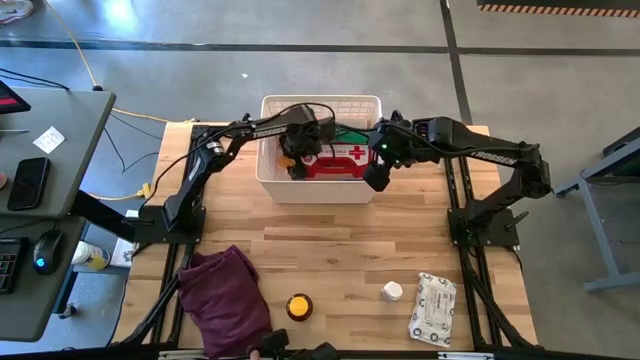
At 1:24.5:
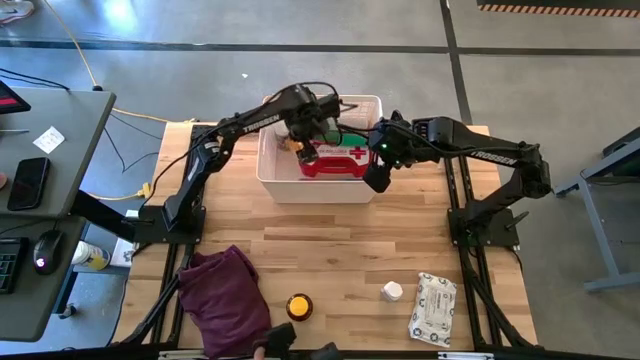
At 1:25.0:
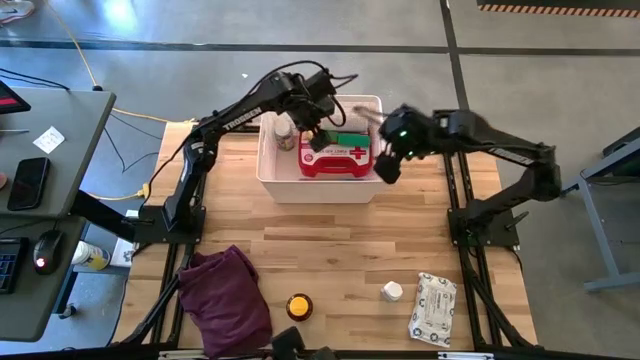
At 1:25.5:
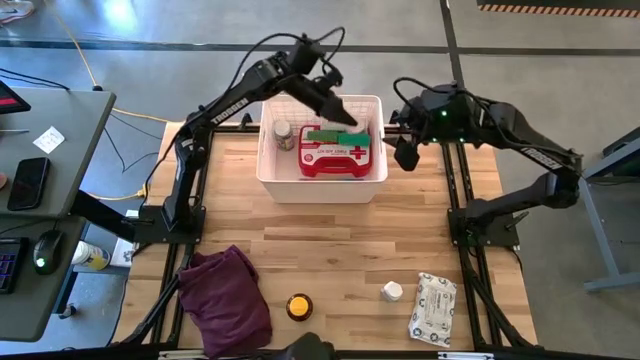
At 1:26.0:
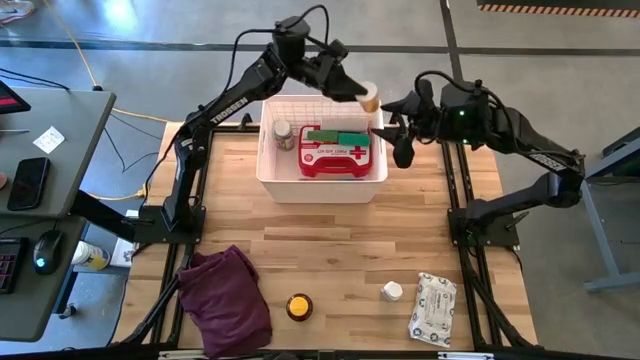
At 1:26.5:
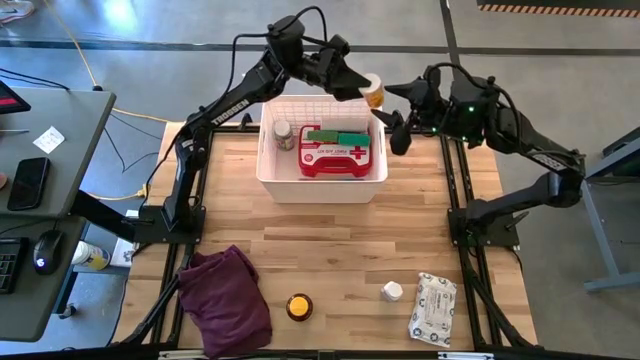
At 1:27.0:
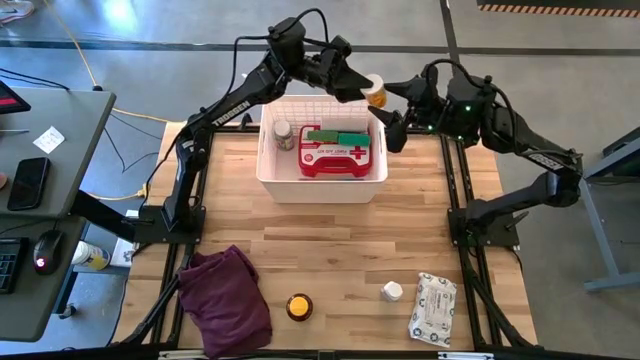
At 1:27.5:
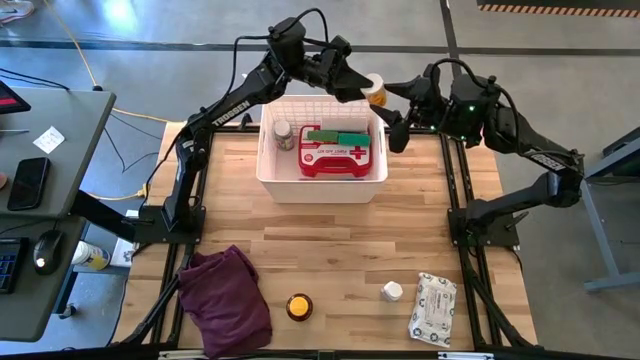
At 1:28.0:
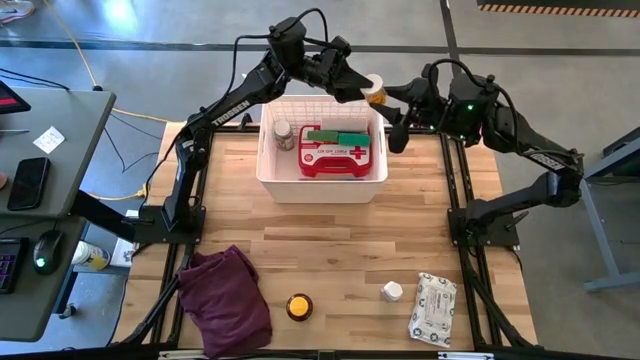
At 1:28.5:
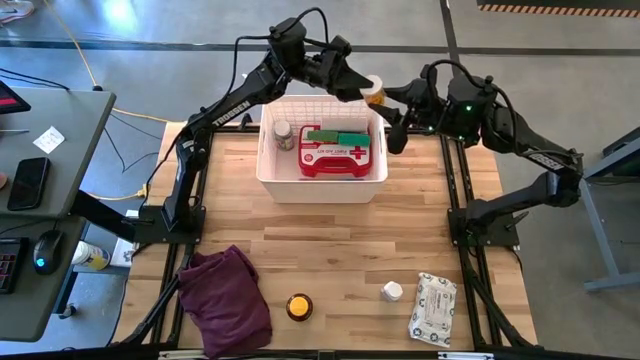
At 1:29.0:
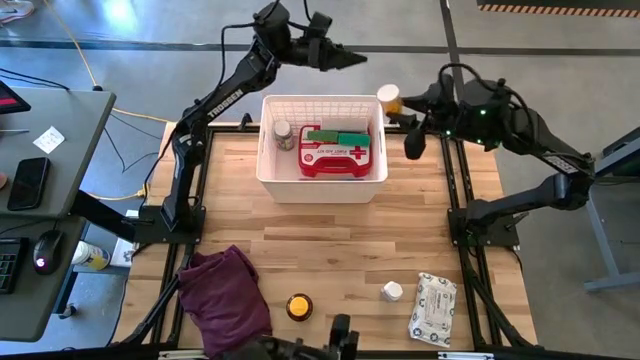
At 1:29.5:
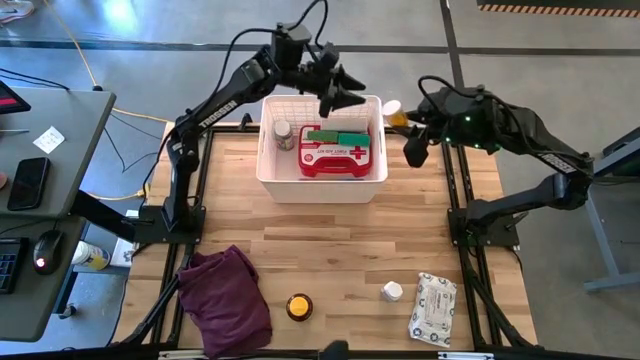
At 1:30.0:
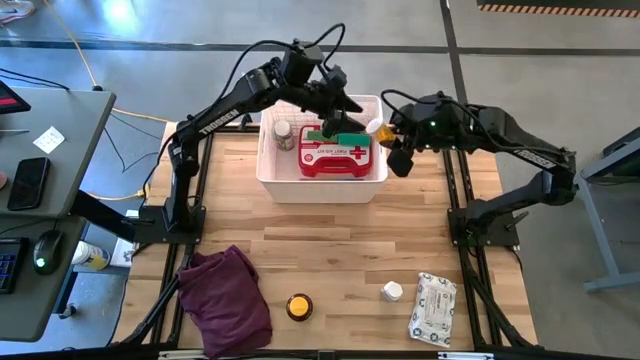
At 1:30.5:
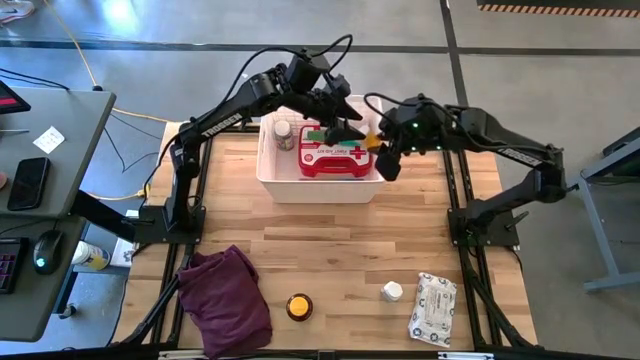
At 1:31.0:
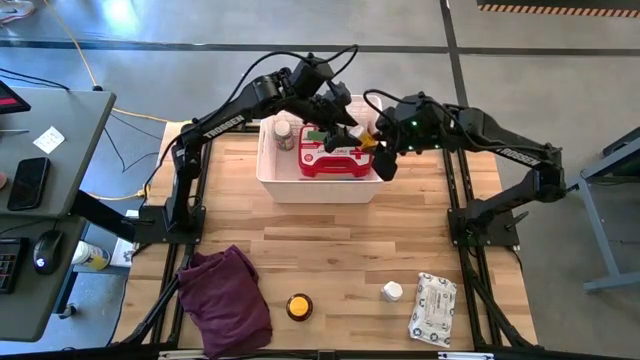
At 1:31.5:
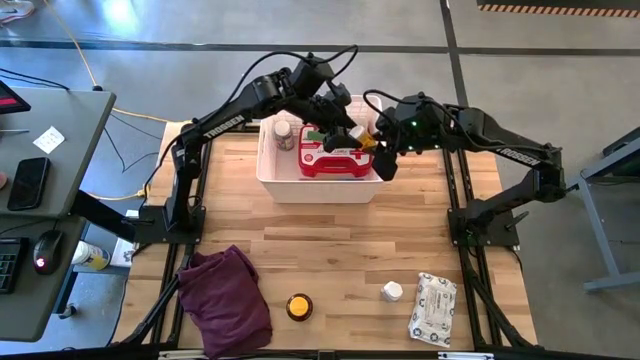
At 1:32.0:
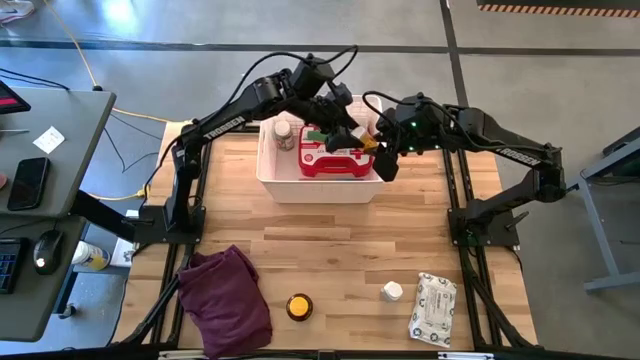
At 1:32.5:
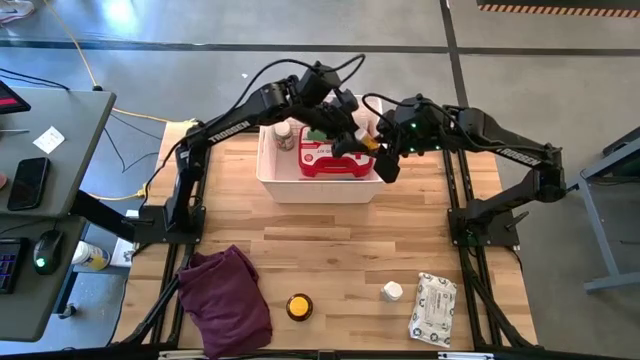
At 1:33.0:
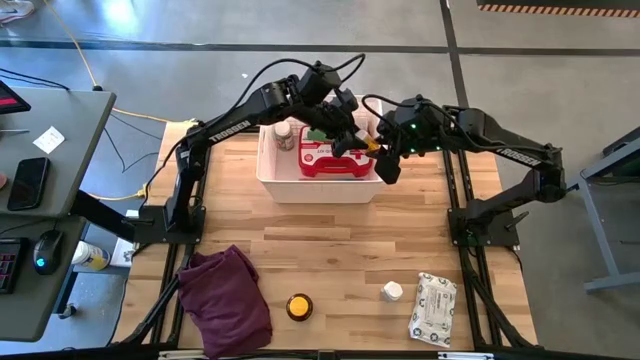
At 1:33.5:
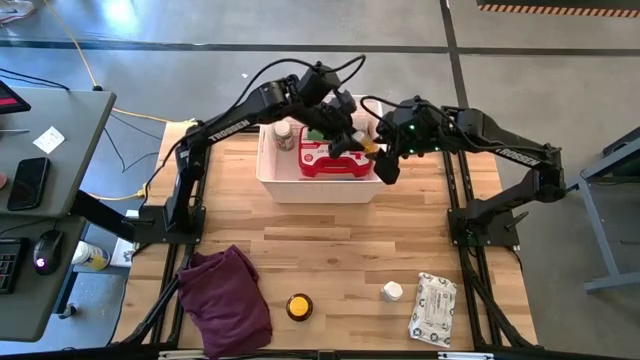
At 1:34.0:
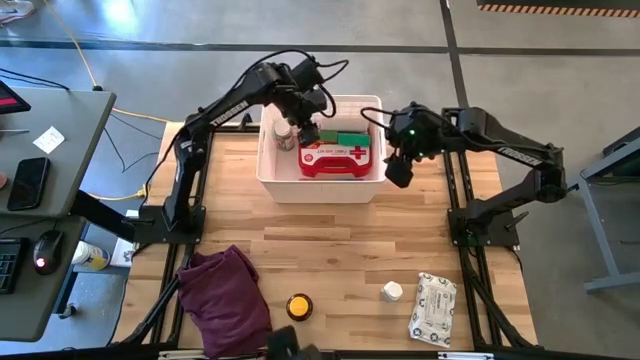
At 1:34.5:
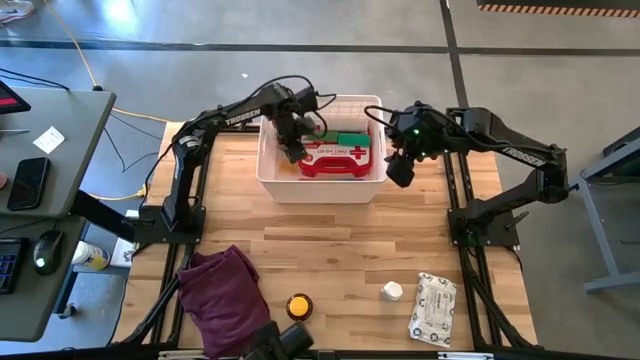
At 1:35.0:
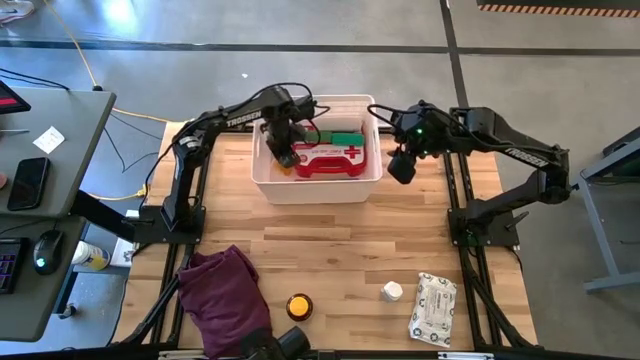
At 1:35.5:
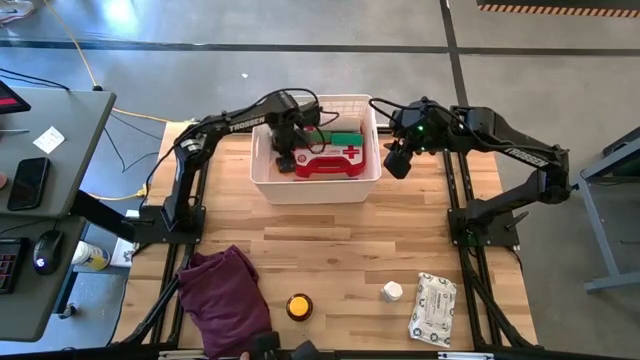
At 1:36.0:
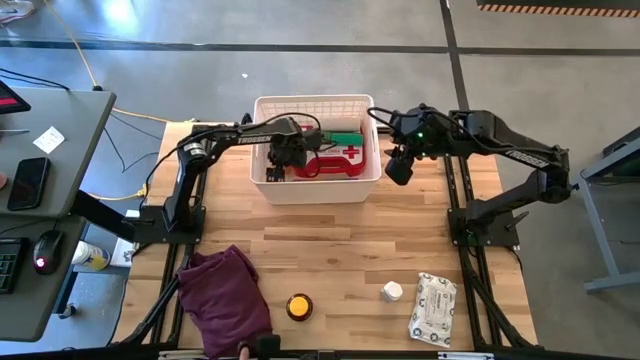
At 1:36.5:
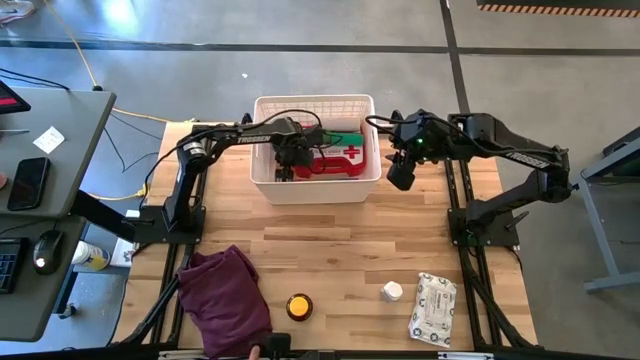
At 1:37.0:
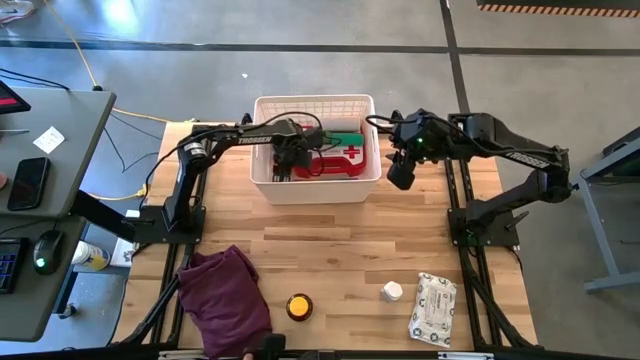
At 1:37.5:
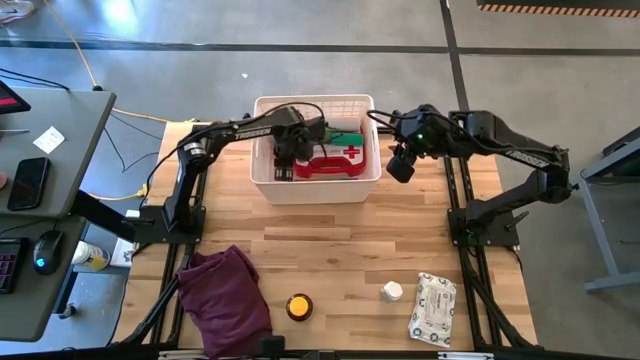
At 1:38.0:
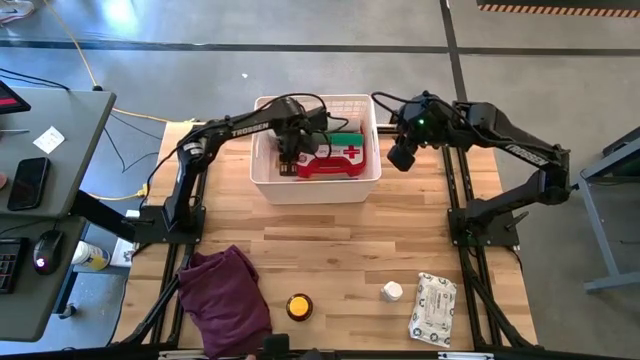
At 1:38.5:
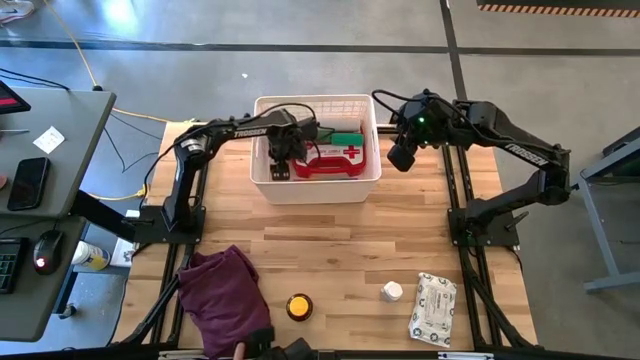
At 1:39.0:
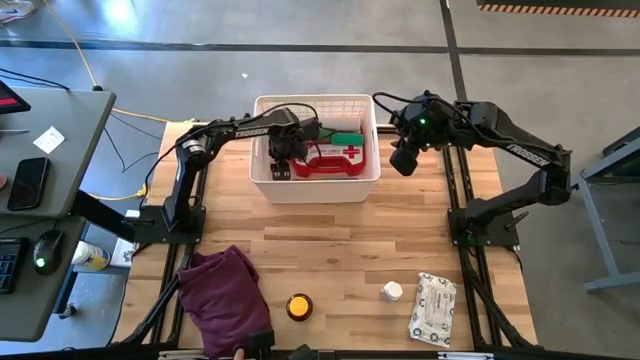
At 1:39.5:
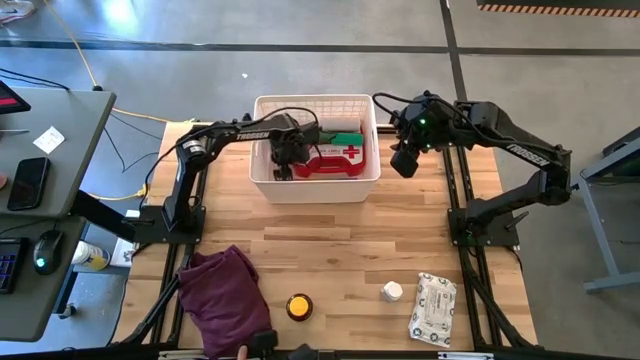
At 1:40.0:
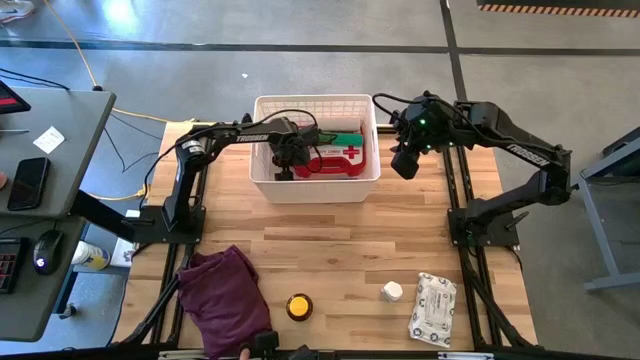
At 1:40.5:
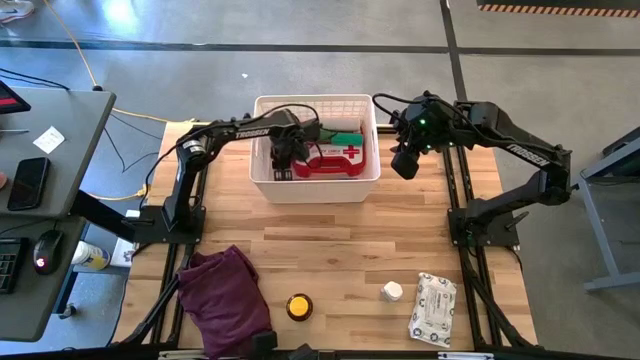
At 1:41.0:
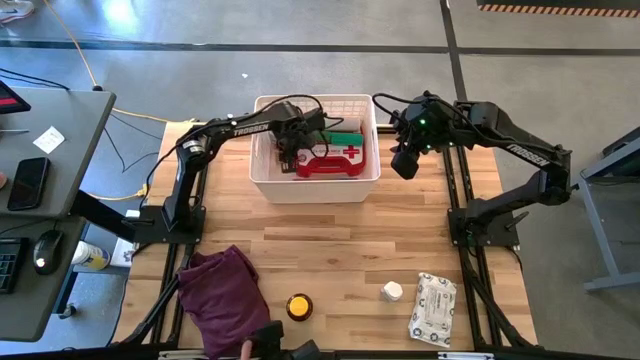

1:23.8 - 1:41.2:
Task: Pick & place medical supplies in basket/bin
Put the orange pill bottle into the white bin

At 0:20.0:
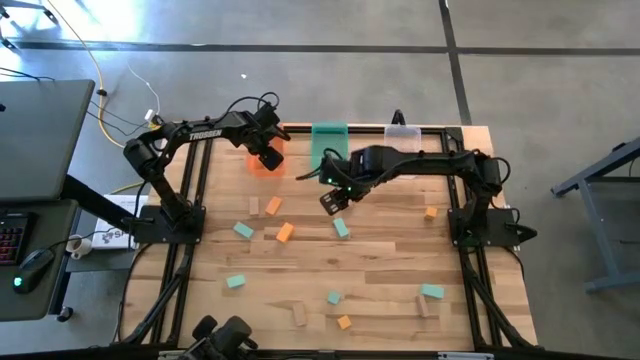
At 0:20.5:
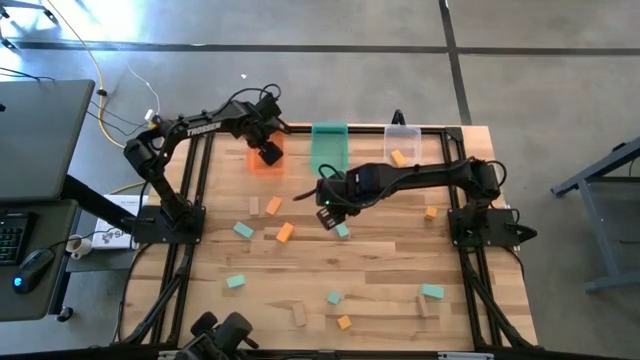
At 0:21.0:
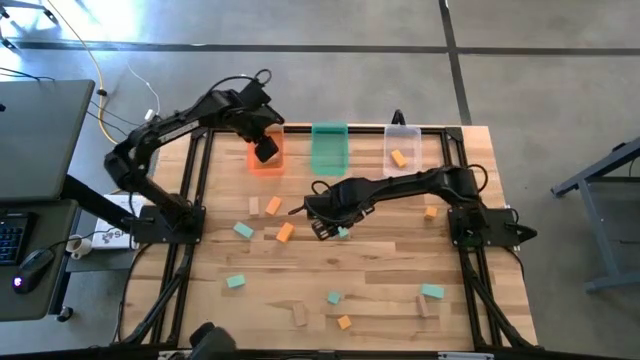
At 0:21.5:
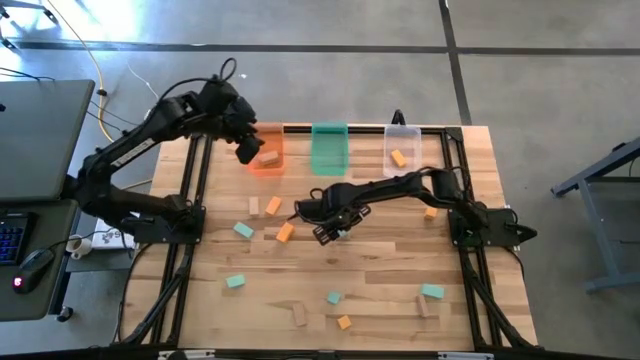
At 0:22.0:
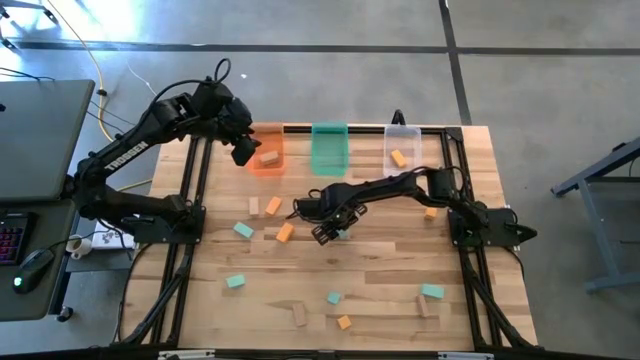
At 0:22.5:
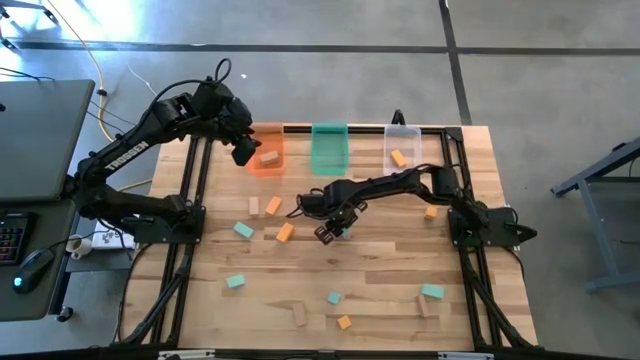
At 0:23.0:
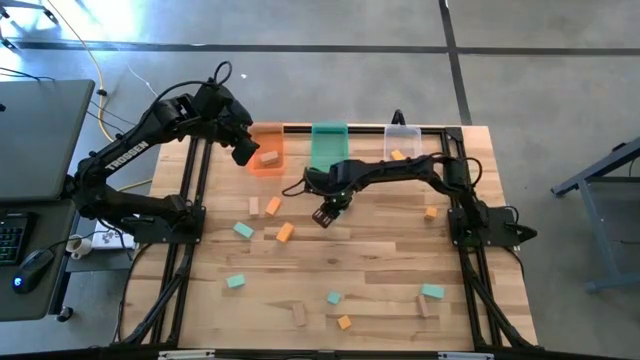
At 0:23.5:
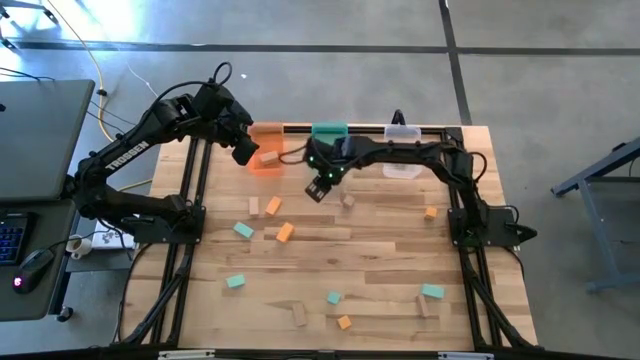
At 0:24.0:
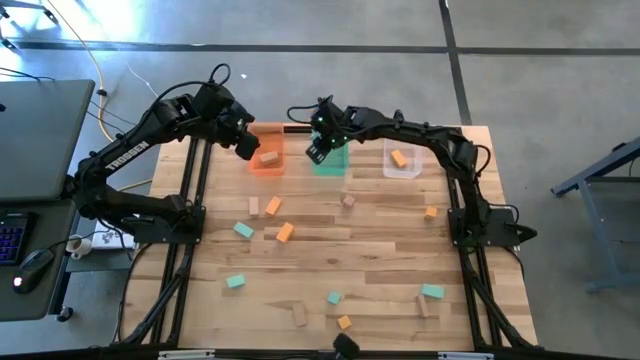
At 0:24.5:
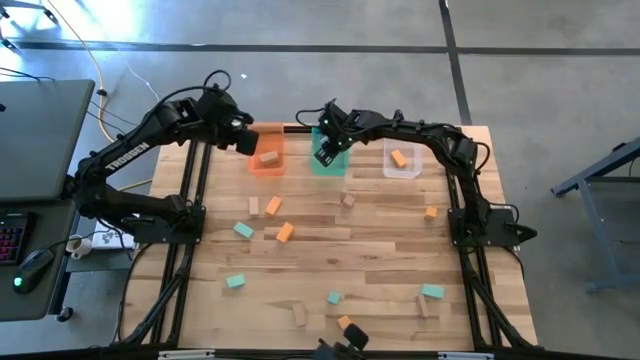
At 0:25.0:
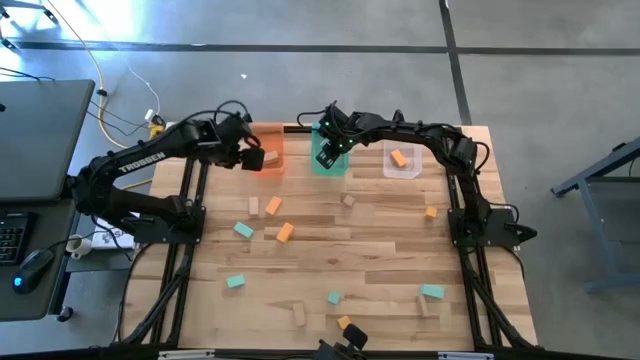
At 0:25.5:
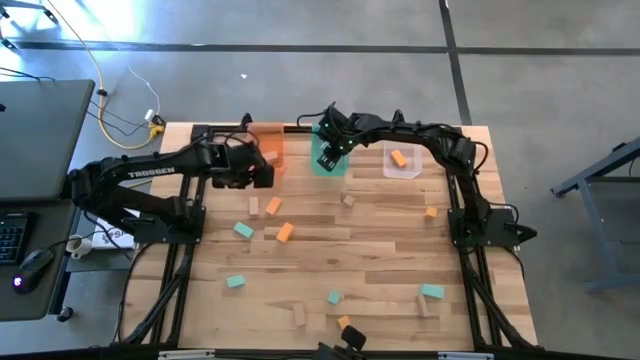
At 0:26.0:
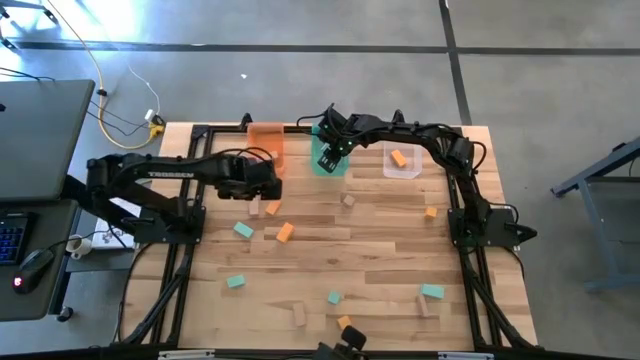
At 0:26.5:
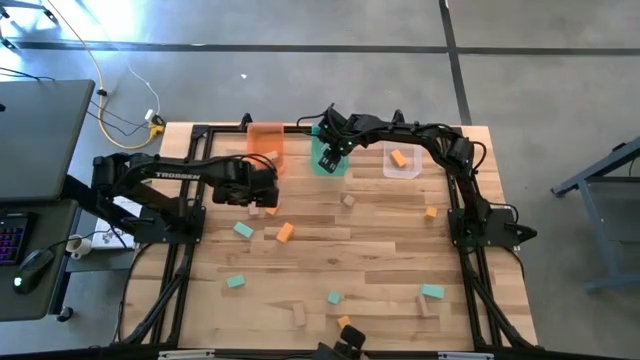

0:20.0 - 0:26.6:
Task: Sort & place blocks by color
Put the blue block into the blue bin
